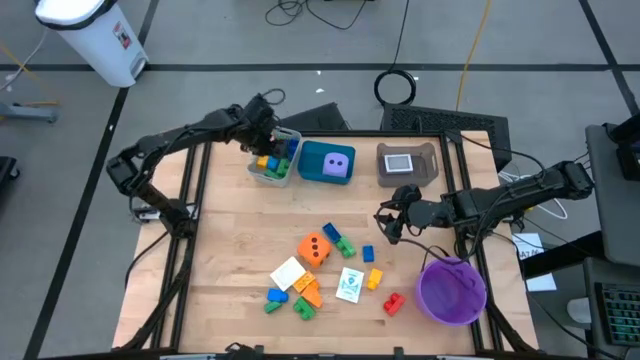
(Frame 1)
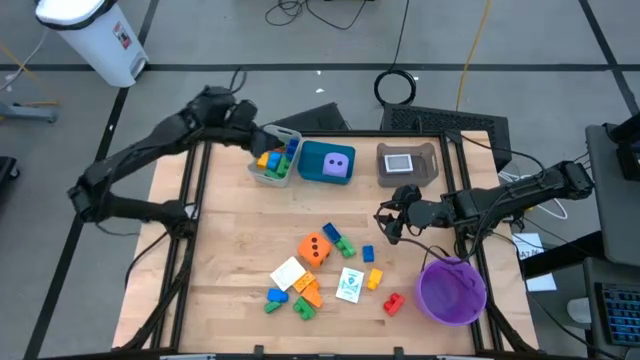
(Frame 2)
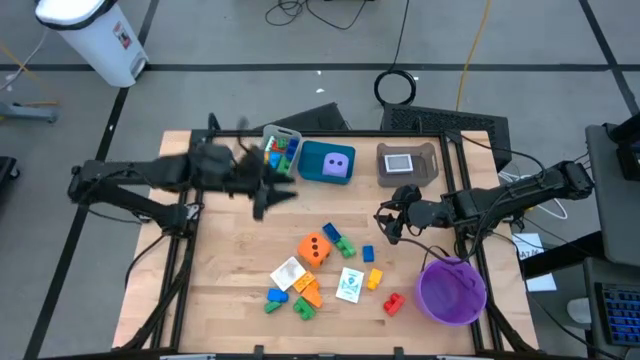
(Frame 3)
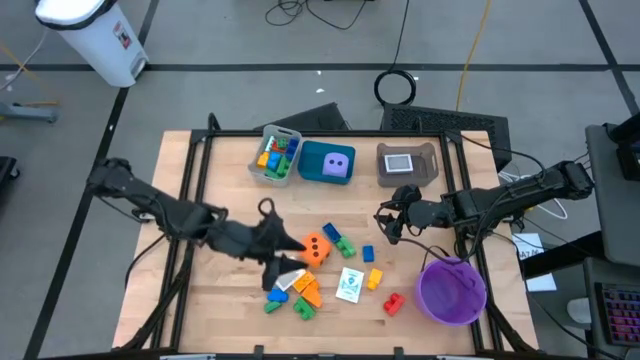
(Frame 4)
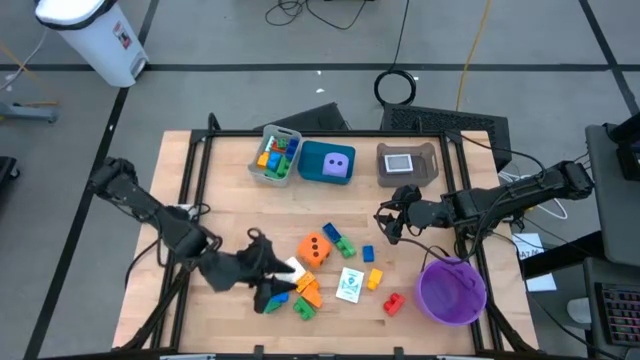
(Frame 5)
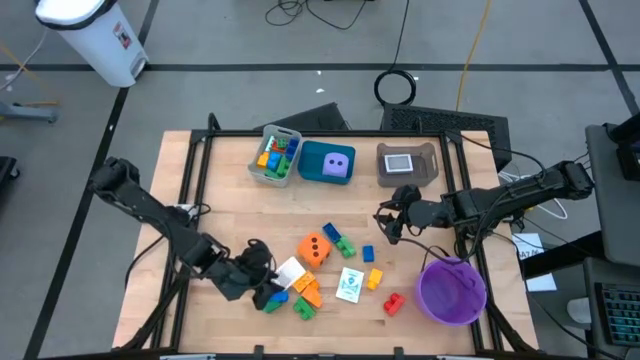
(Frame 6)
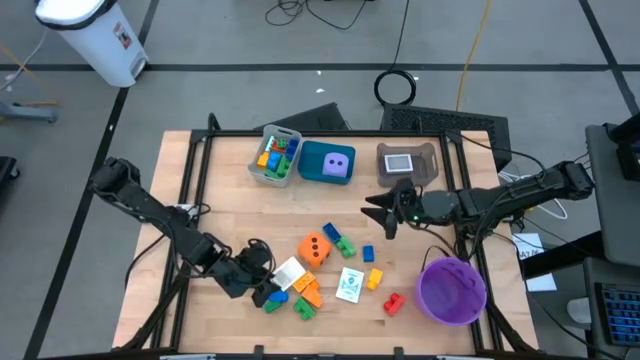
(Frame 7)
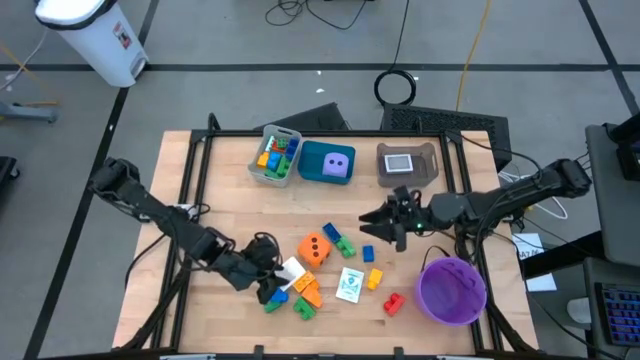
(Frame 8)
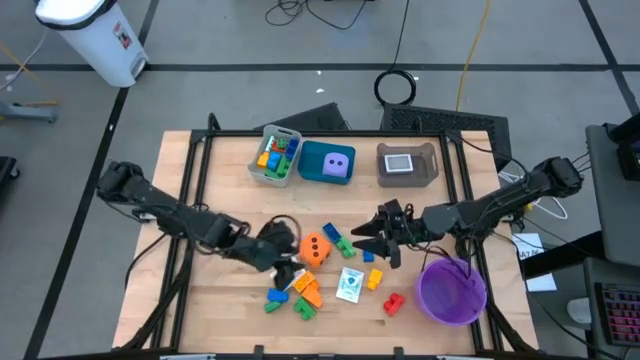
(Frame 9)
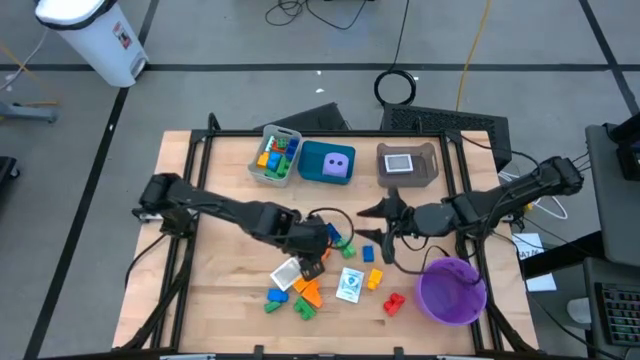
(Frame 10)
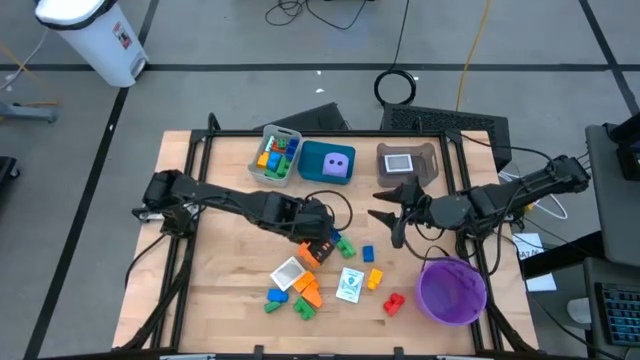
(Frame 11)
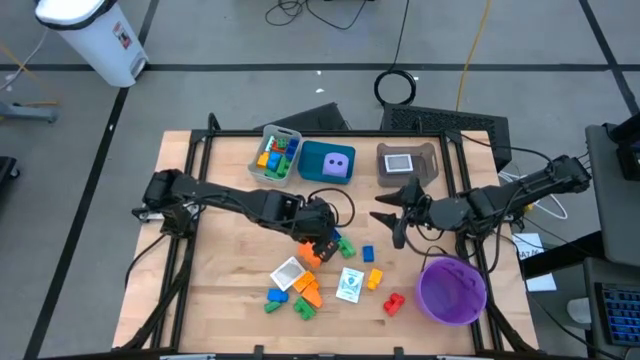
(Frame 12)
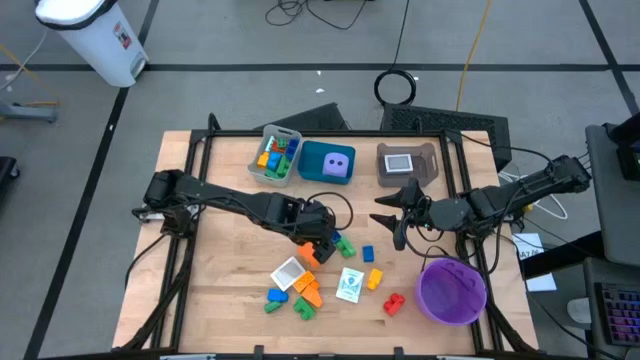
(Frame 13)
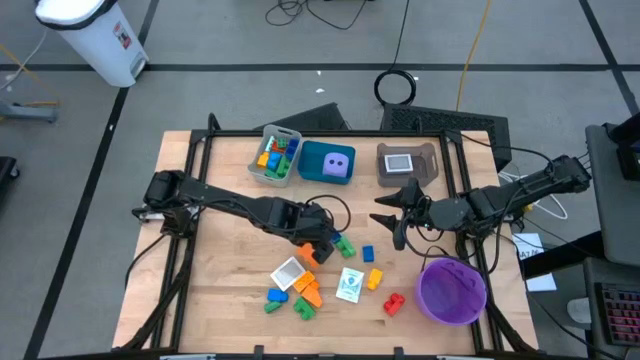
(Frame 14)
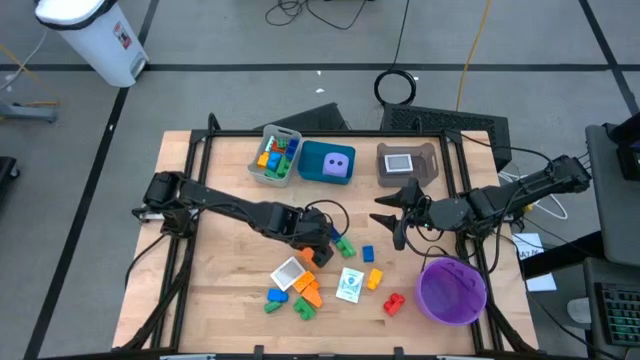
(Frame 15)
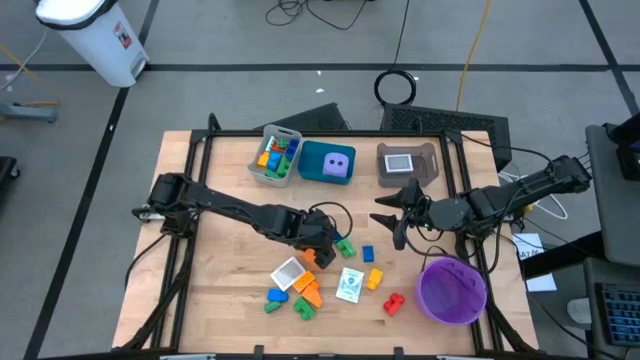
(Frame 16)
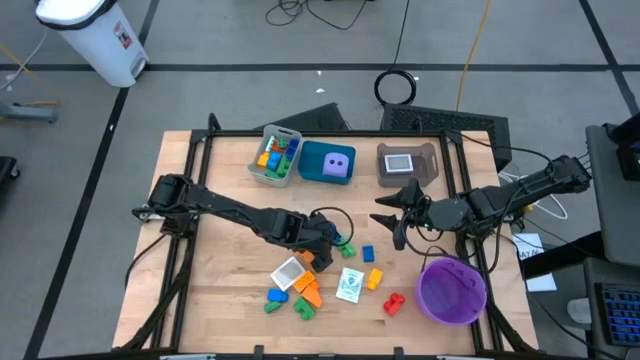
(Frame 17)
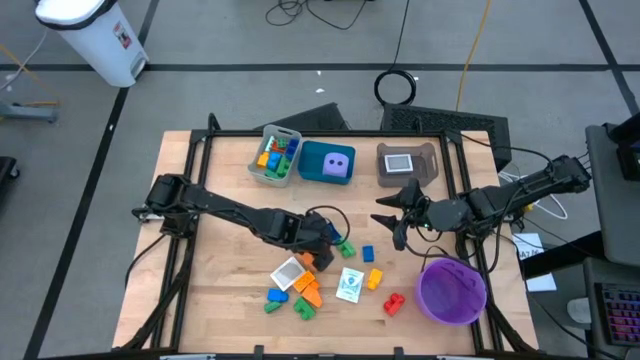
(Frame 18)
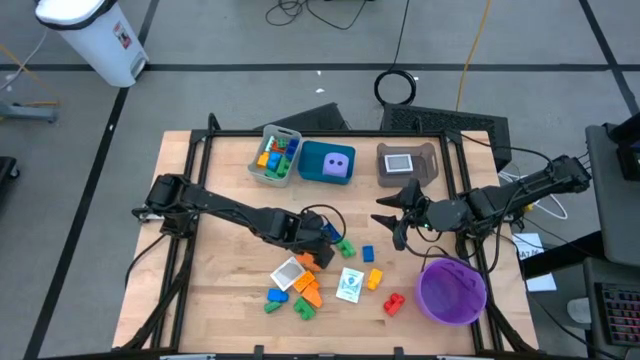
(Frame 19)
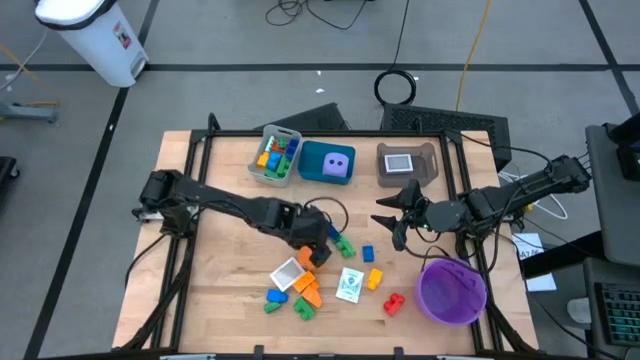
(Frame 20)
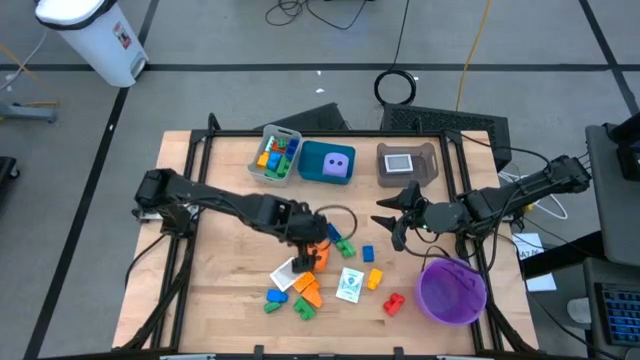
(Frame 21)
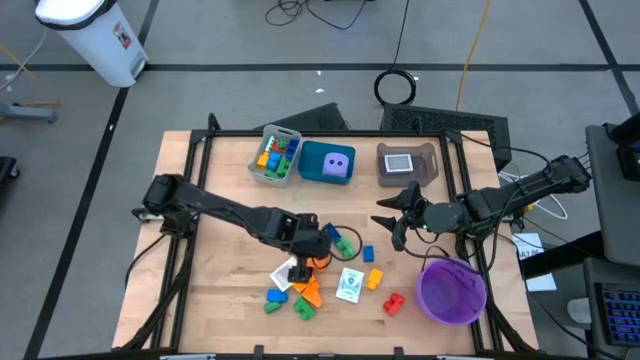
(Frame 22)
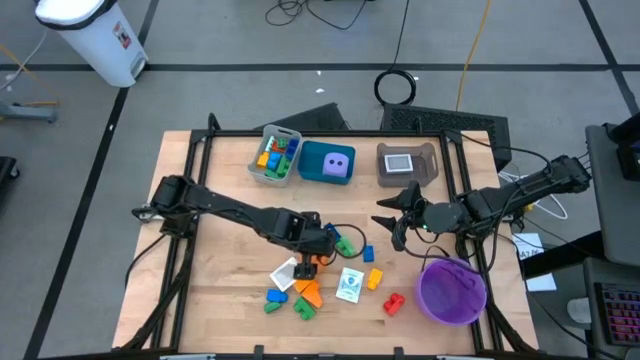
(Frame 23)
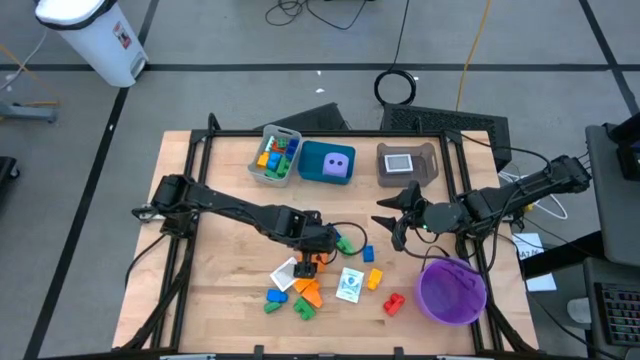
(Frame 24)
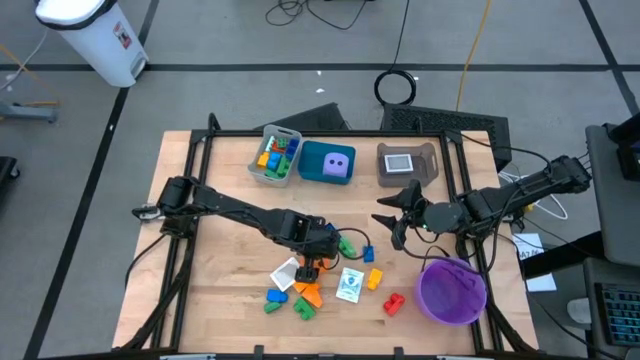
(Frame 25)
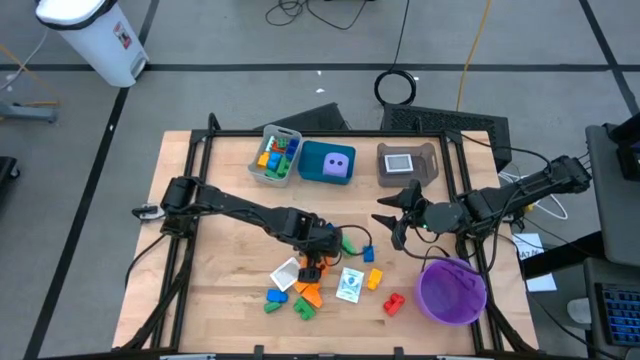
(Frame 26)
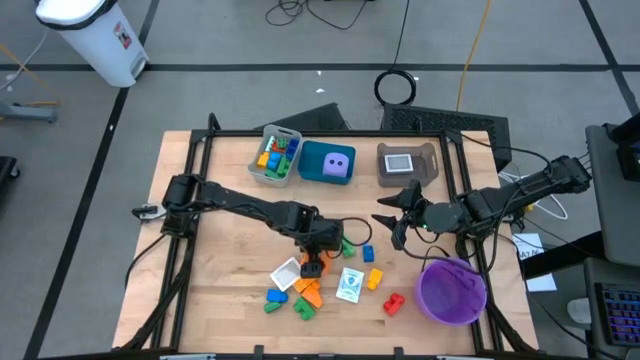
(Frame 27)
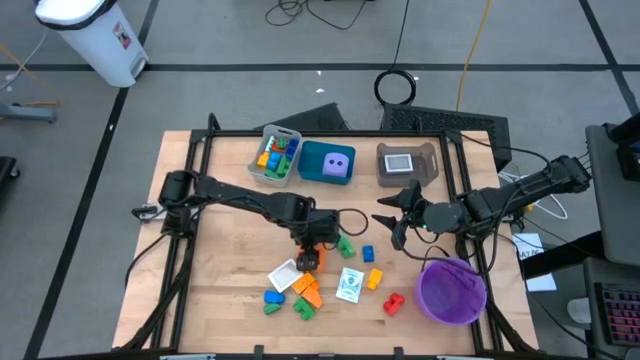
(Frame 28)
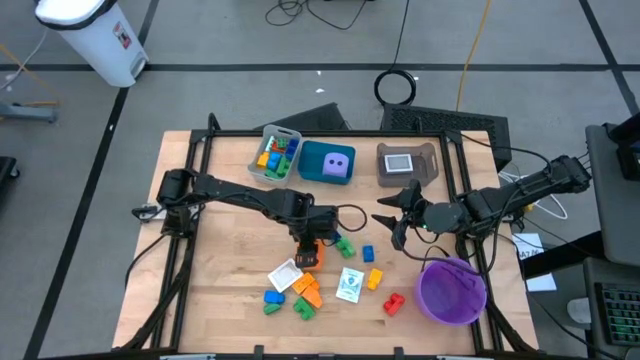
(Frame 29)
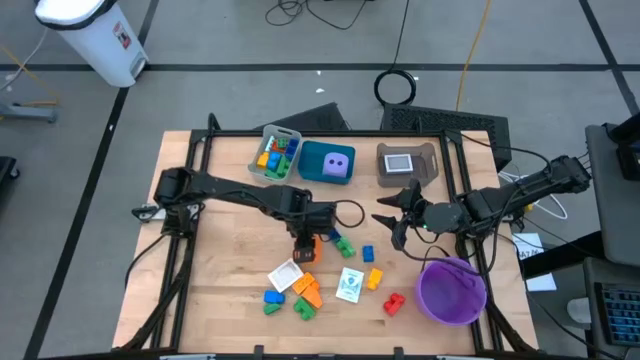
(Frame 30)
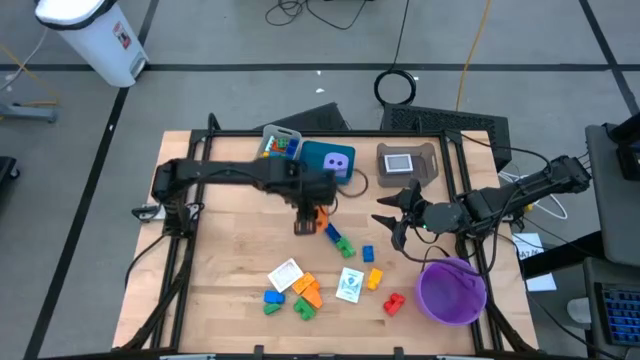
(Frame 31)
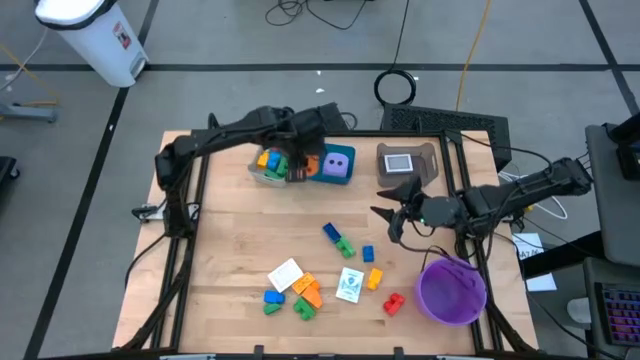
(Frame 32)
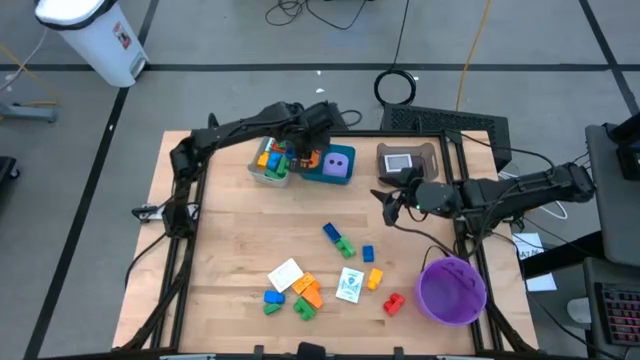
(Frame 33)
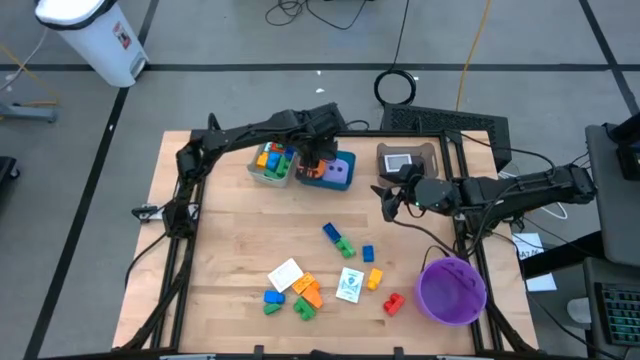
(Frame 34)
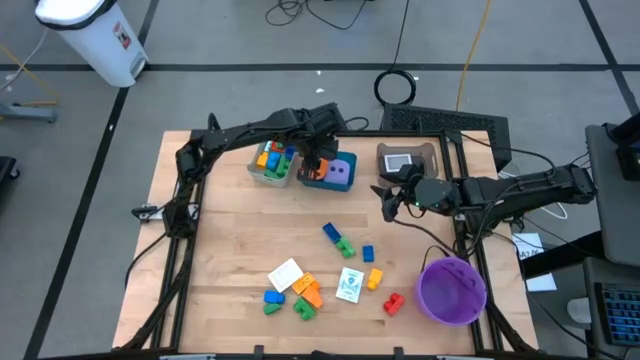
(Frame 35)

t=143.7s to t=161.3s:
Task: Pick & Place Toys
Put the orange dice into the blue bin

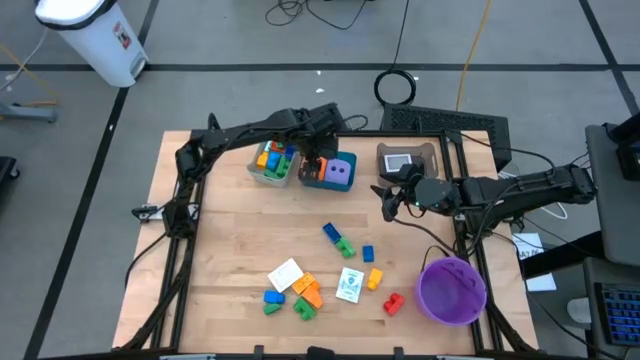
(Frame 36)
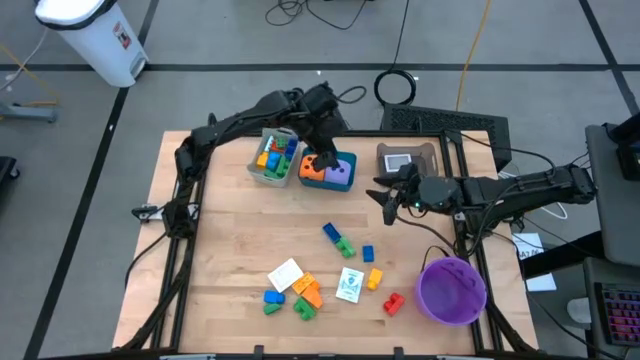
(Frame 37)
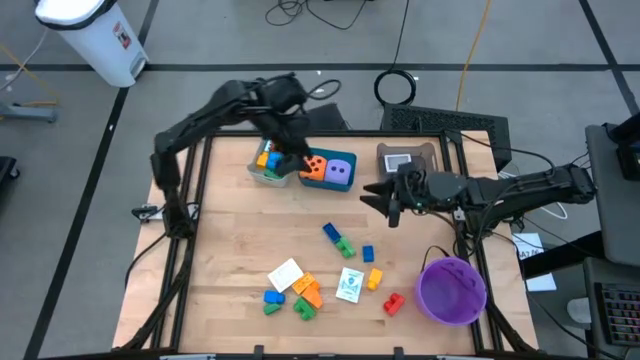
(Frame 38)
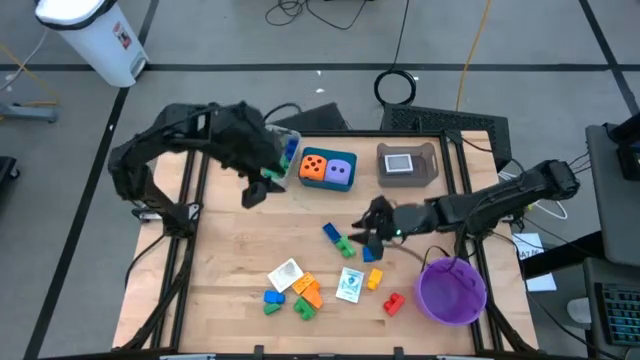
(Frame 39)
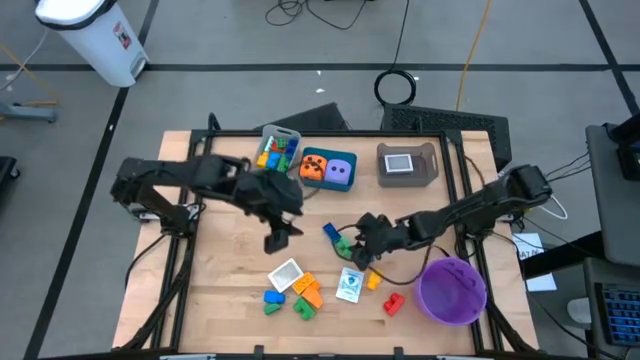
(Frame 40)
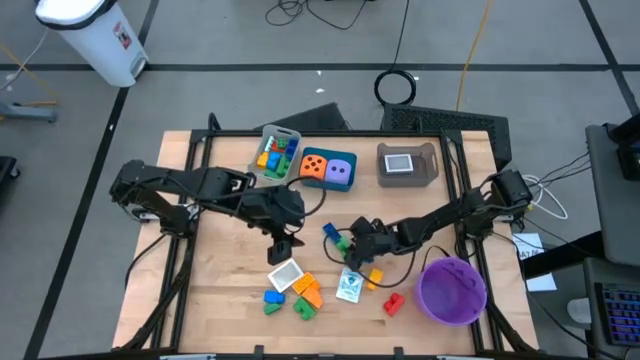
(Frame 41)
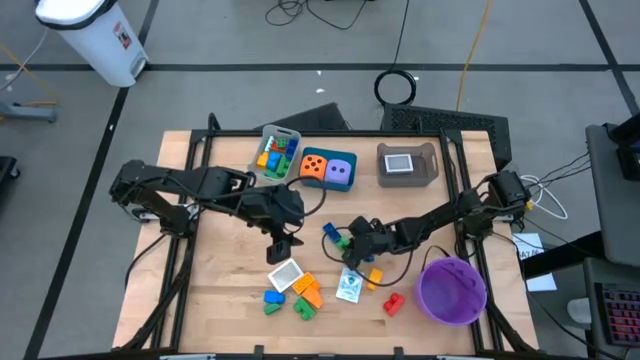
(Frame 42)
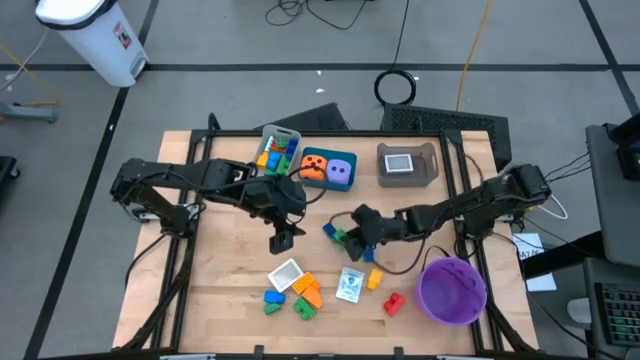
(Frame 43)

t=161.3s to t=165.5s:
Put the green game piece into the gray bin
